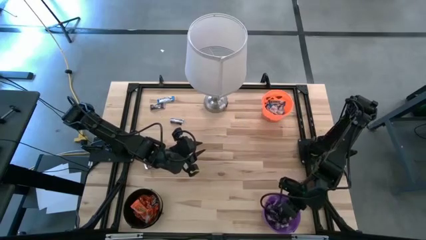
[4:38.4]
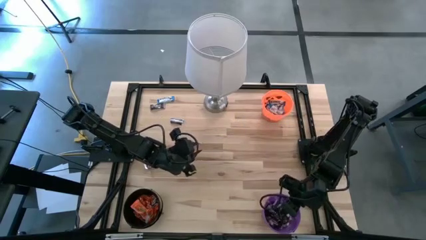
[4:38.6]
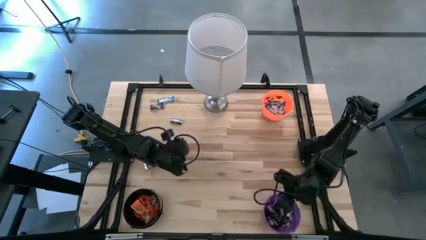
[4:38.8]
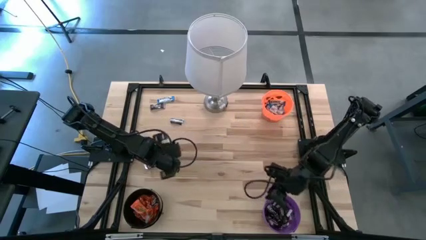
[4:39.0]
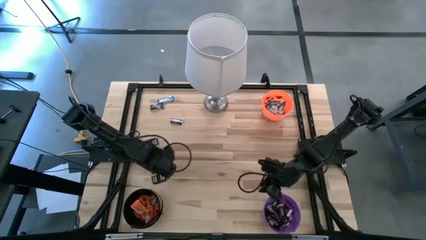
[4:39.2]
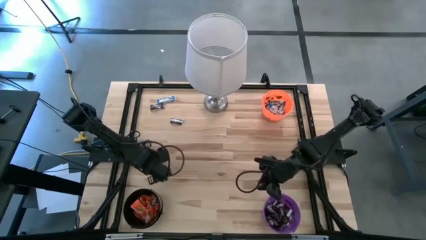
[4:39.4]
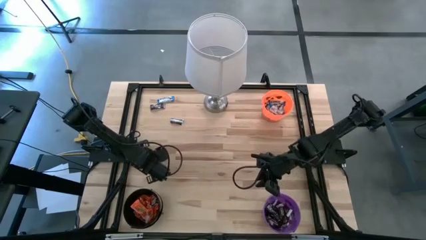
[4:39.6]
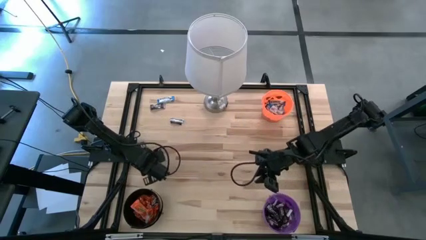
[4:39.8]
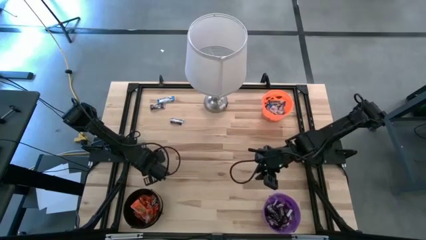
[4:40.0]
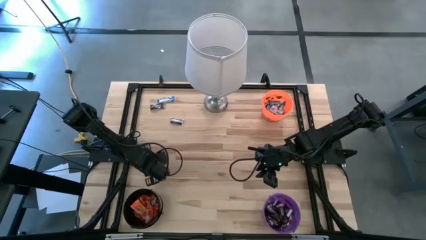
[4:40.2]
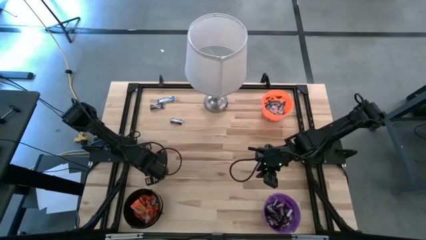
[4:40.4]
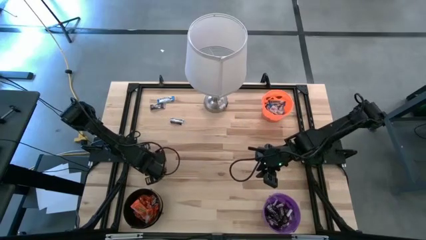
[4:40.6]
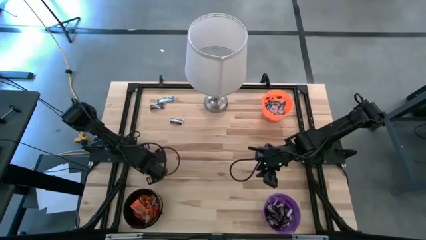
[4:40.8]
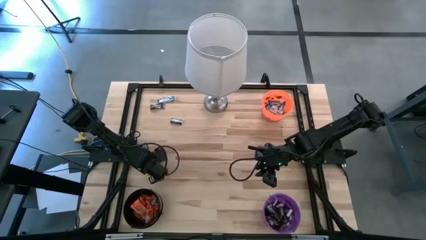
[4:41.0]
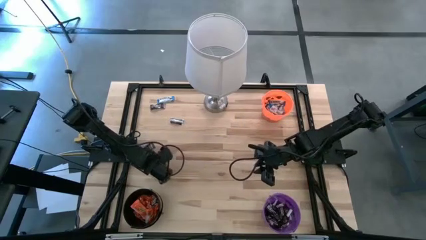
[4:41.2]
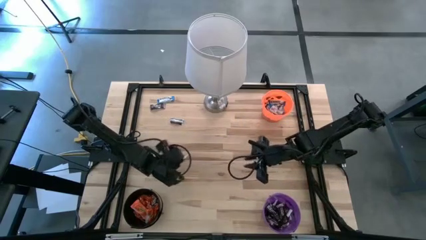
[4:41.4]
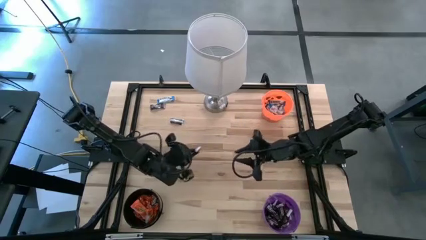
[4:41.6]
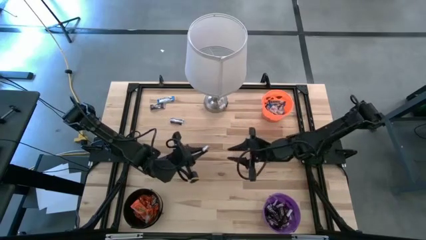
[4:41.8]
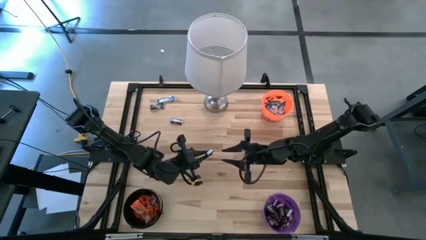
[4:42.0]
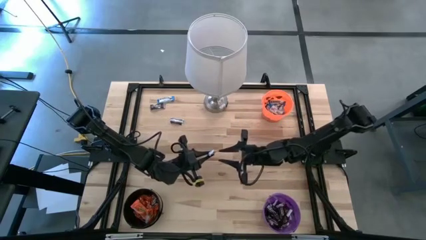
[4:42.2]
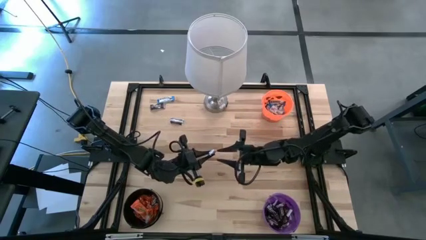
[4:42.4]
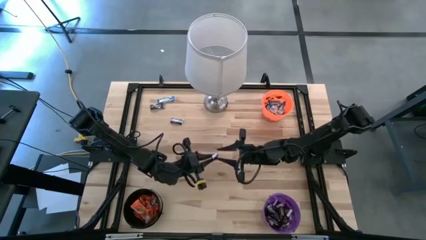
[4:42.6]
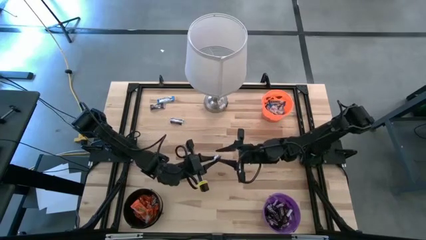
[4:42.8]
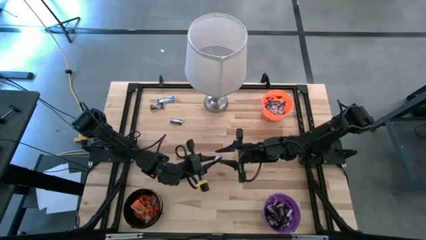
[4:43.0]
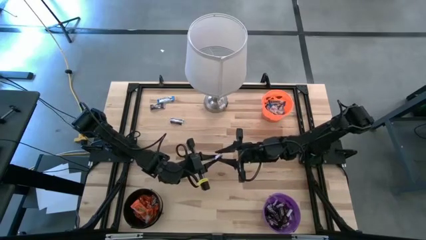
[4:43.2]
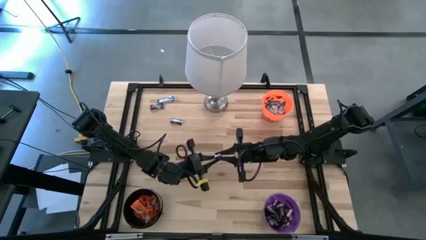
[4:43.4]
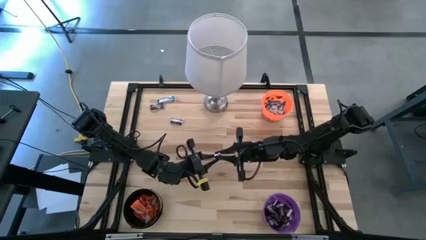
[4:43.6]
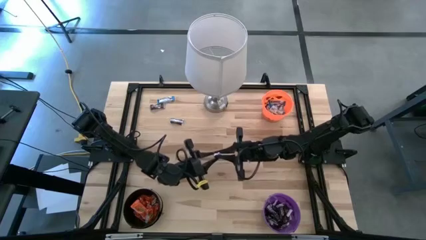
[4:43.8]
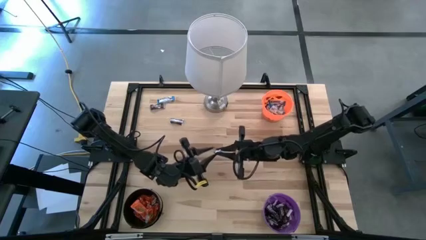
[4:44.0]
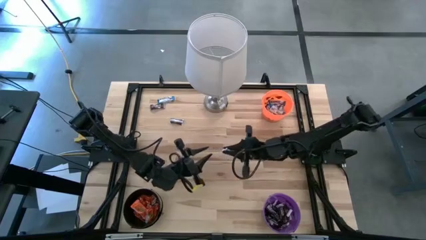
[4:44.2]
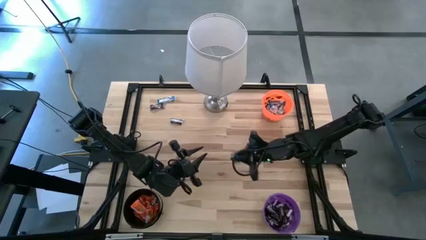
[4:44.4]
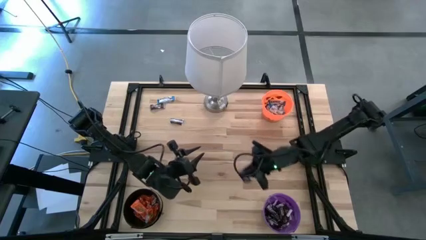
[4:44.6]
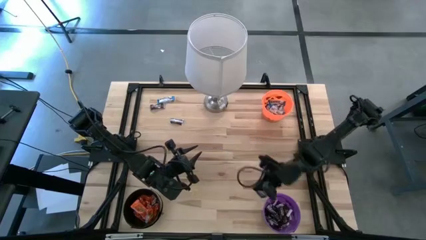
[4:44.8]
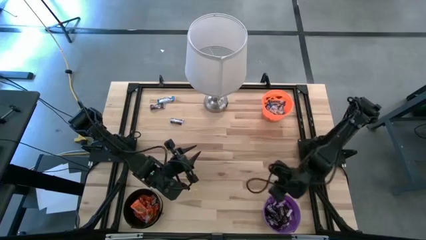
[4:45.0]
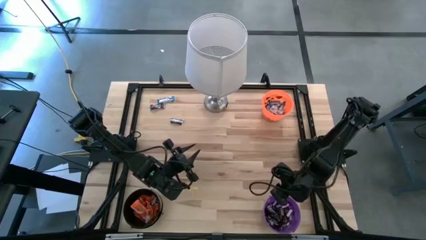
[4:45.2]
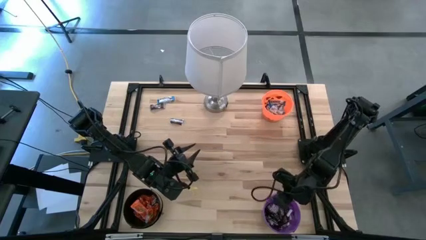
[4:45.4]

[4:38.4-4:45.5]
Task: Sort candy
Put the brown chocolate bar into the violet bucket

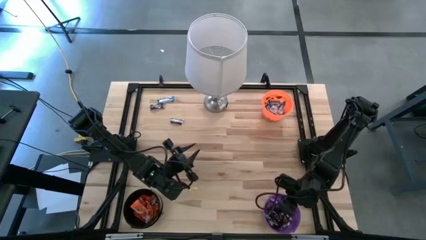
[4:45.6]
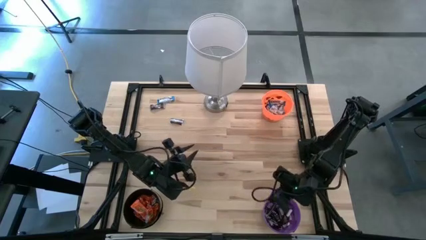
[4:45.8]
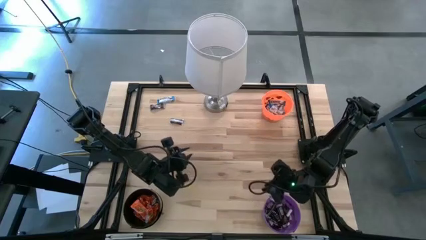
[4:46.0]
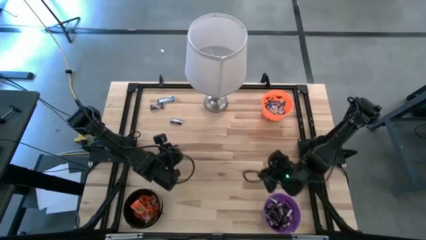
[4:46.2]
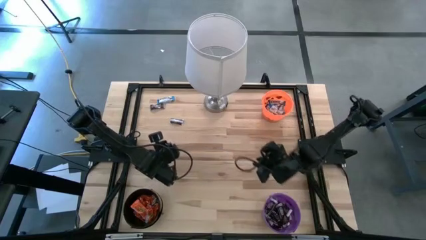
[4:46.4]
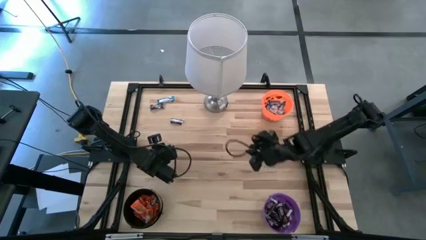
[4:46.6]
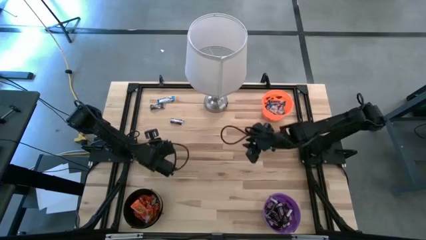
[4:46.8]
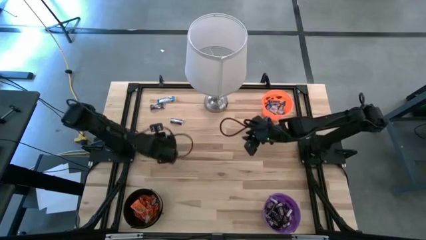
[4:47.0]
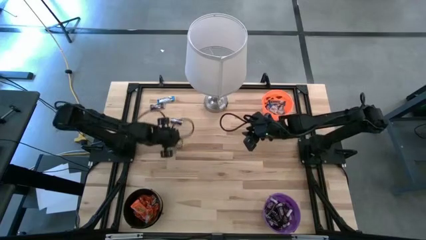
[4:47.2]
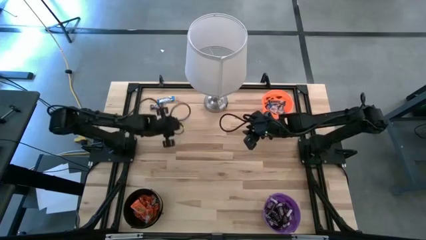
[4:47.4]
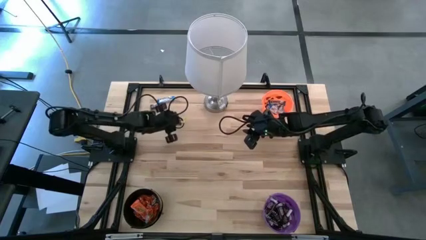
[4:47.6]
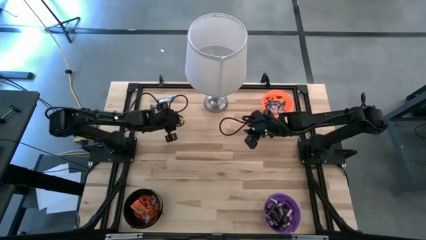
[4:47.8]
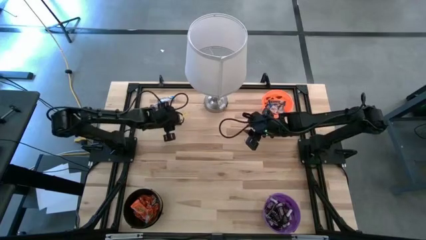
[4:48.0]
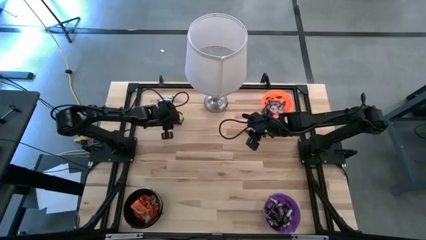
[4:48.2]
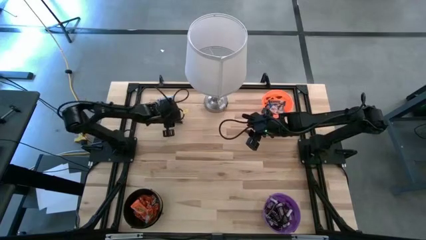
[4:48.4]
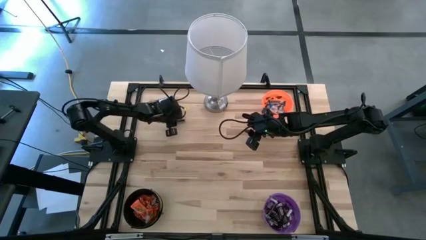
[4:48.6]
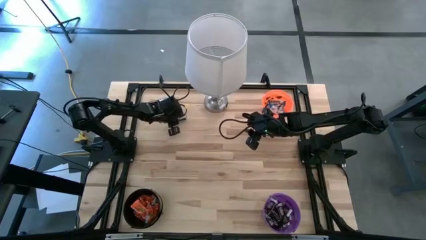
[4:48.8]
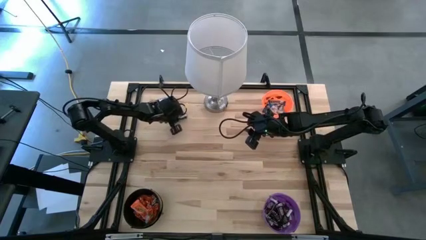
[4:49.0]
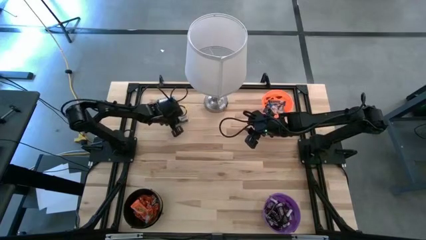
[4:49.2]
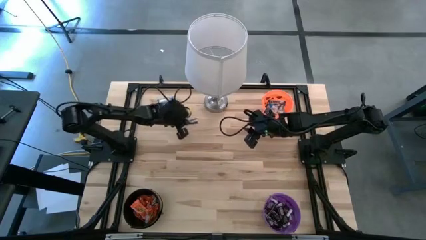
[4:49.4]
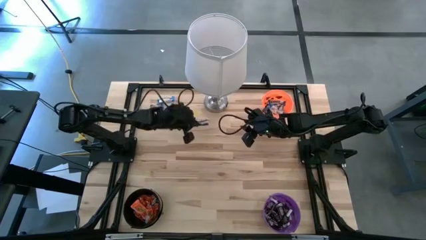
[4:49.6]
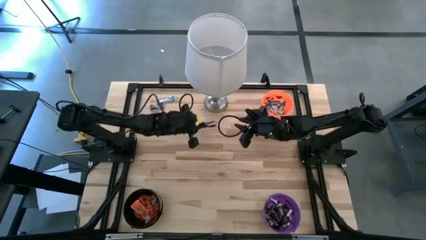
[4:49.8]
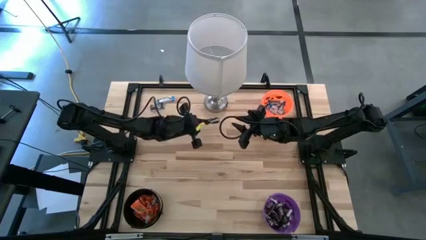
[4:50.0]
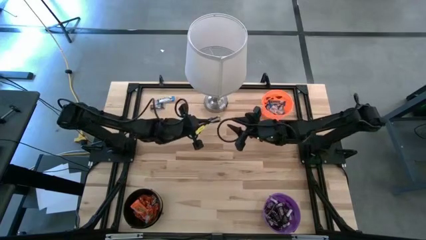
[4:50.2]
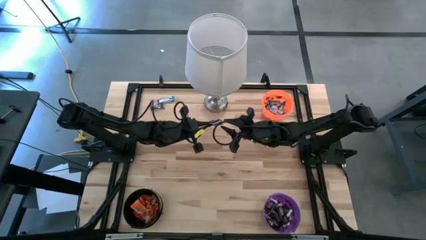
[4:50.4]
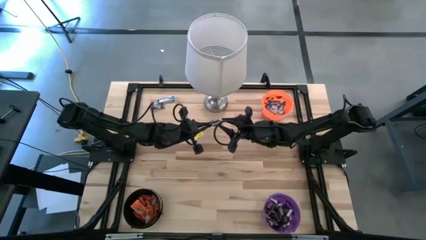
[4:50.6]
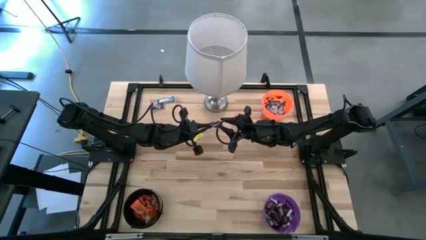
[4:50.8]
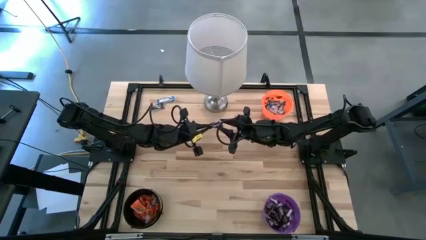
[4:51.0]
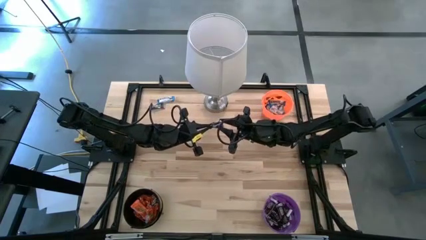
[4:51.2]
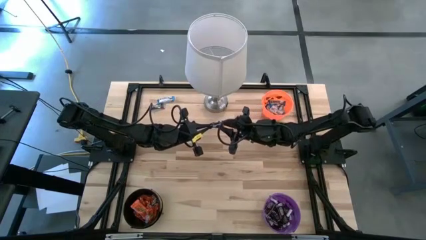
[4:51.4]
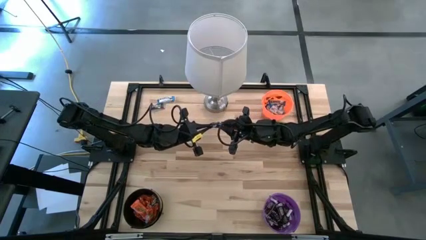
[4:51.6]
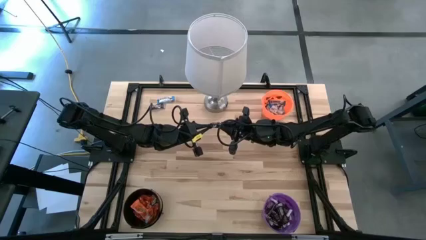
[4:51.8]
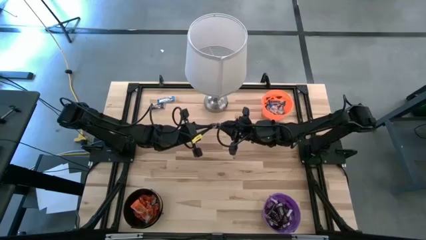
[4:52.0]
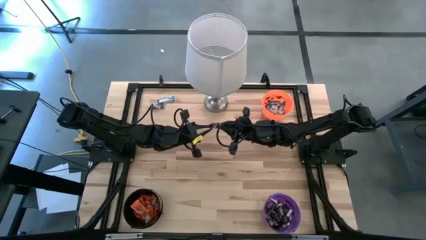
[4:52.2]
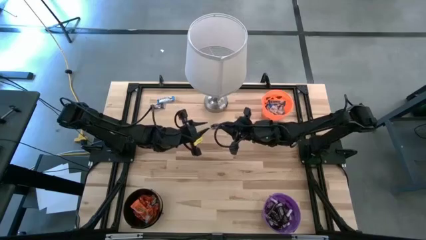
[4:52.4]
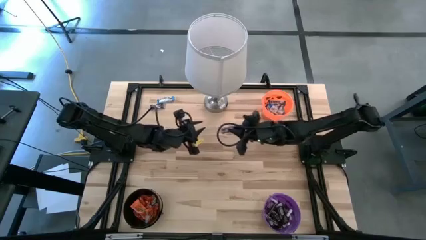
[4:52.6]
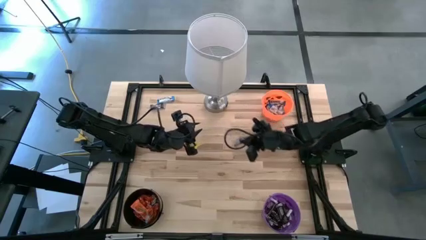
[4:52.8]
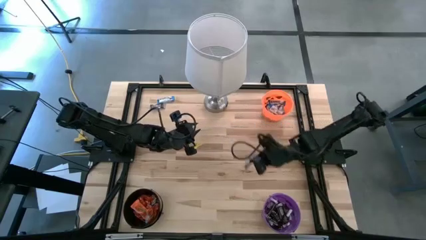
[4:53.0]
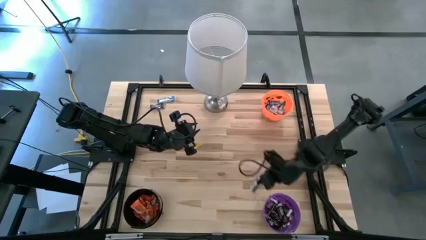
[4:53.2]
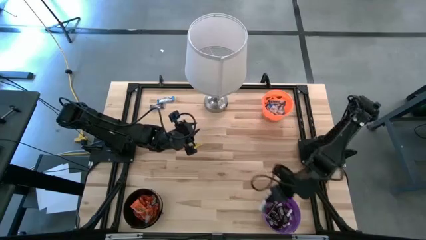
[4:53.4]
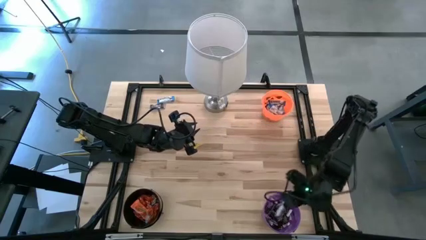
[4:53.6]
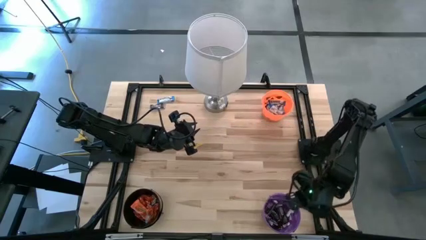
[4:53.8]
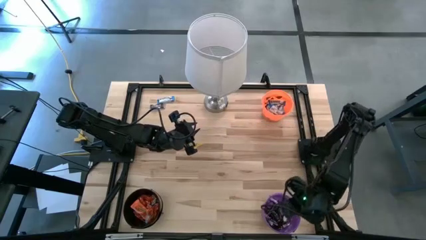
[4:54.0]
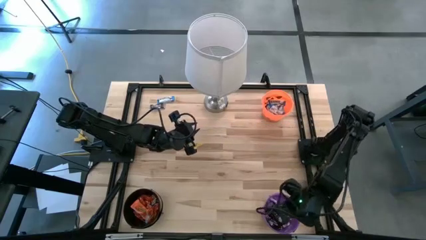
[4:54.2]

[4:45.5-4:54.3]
Put the brown chocolate bar into the violet bucket
